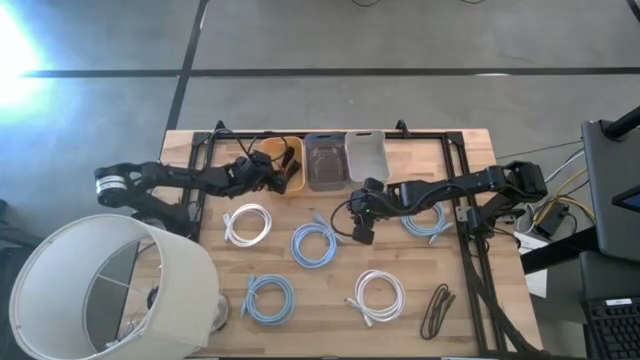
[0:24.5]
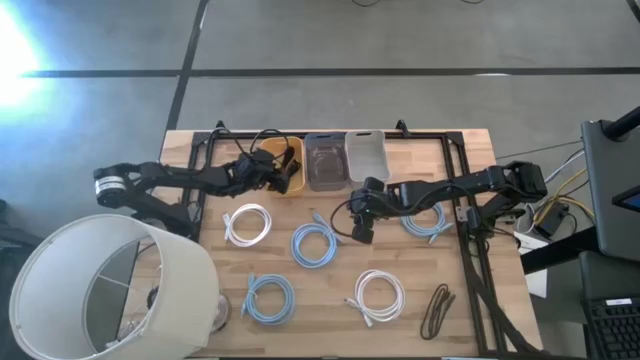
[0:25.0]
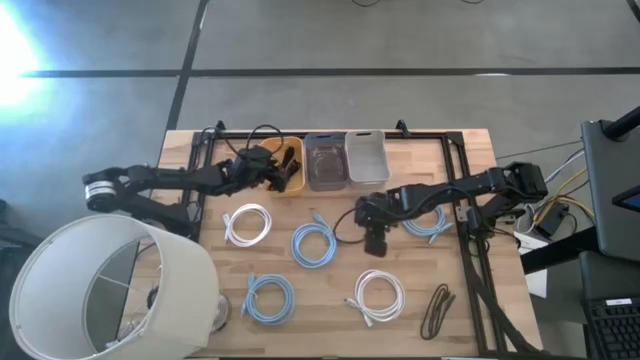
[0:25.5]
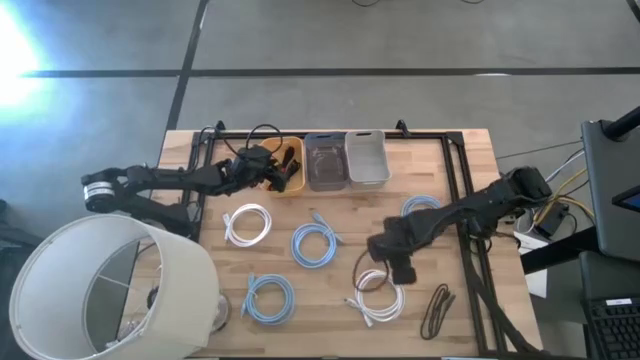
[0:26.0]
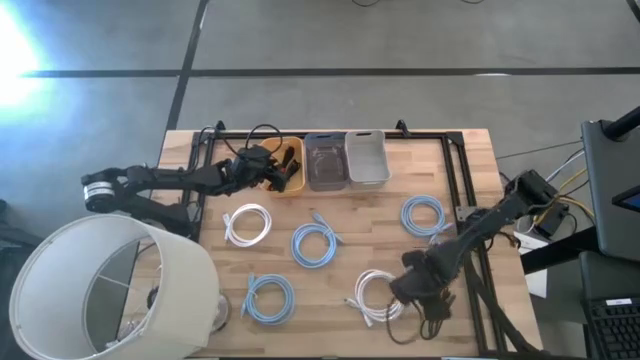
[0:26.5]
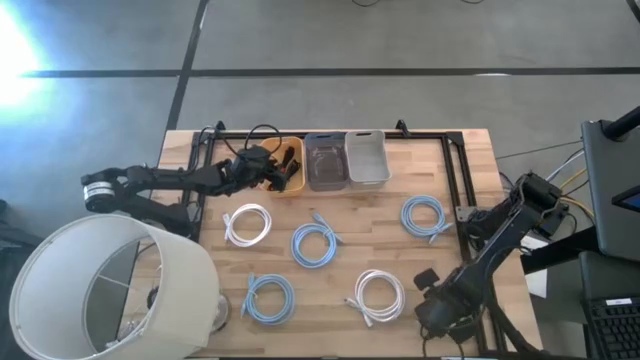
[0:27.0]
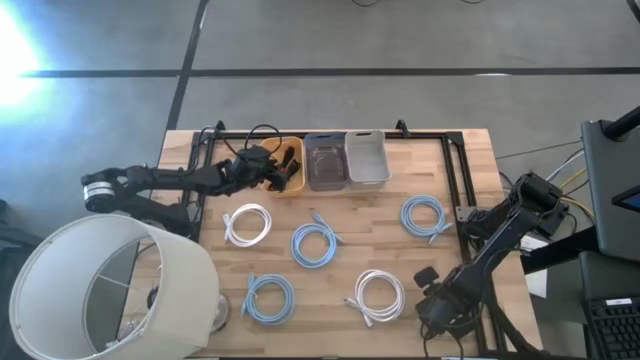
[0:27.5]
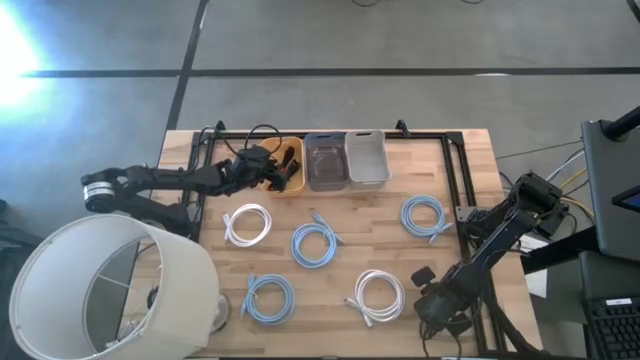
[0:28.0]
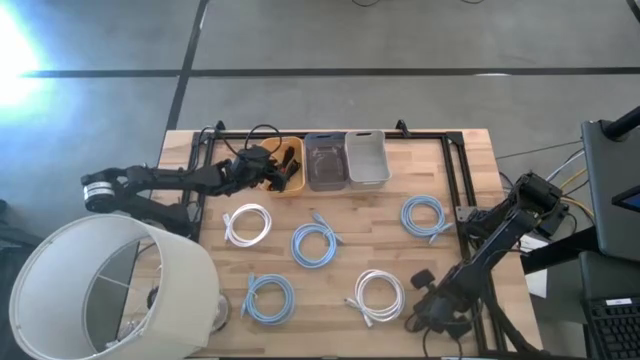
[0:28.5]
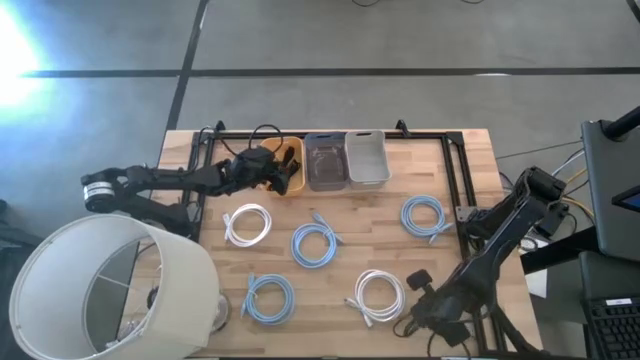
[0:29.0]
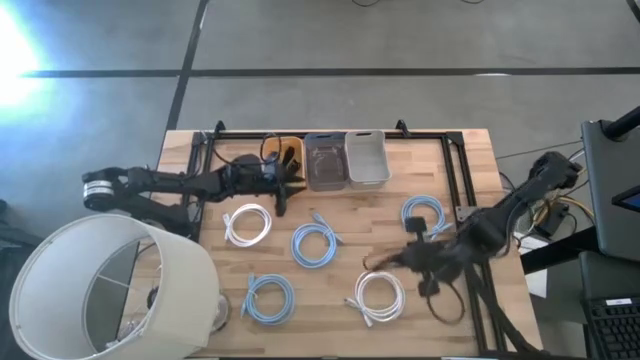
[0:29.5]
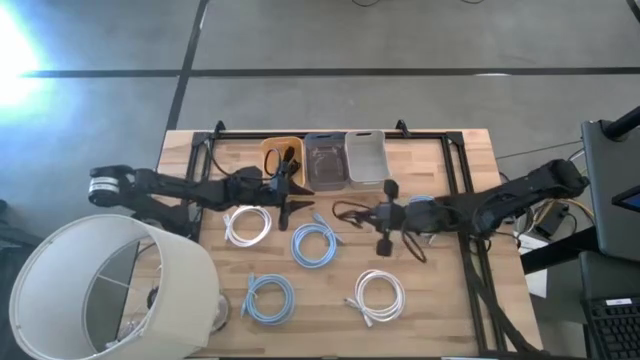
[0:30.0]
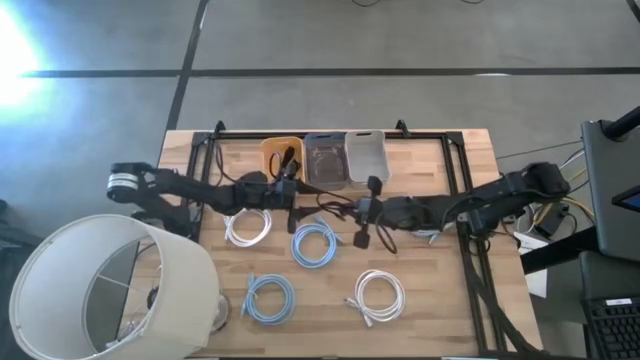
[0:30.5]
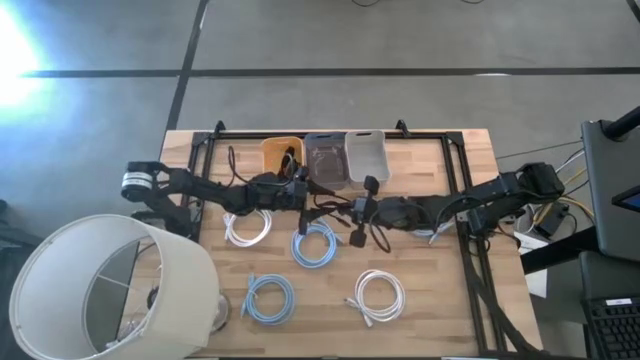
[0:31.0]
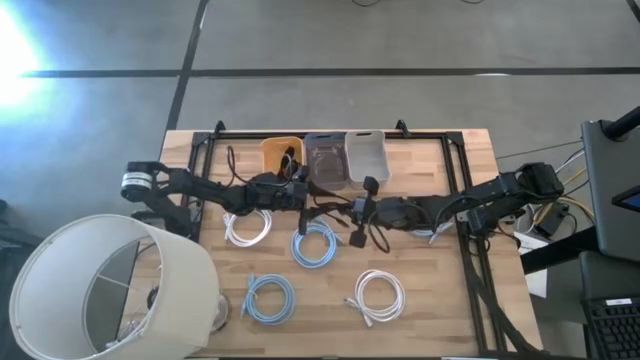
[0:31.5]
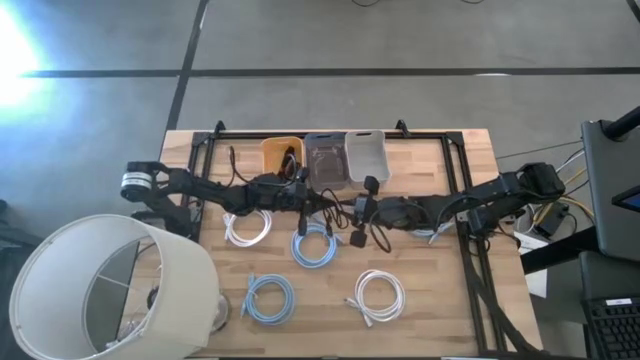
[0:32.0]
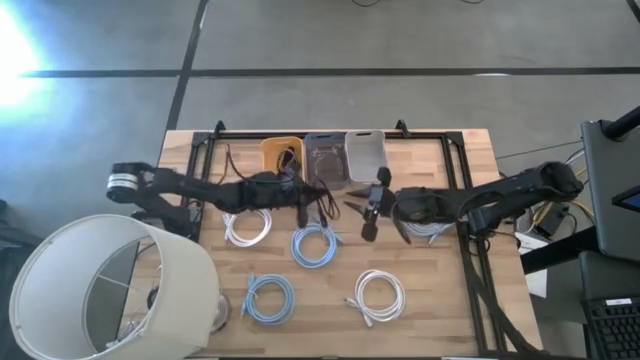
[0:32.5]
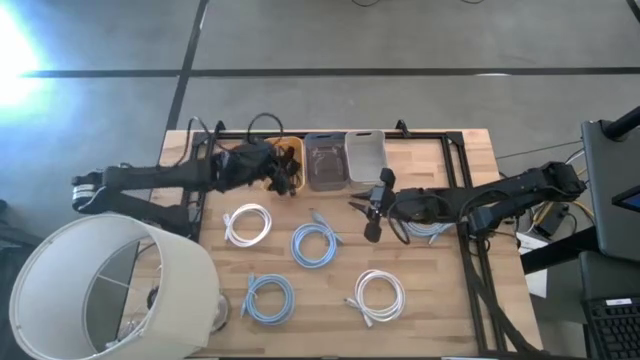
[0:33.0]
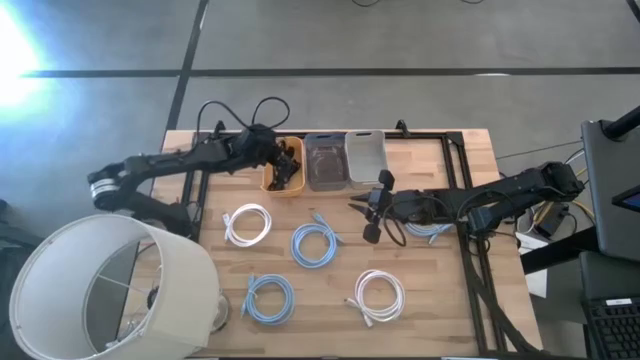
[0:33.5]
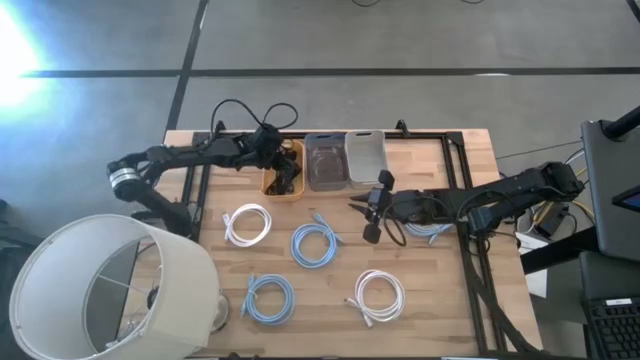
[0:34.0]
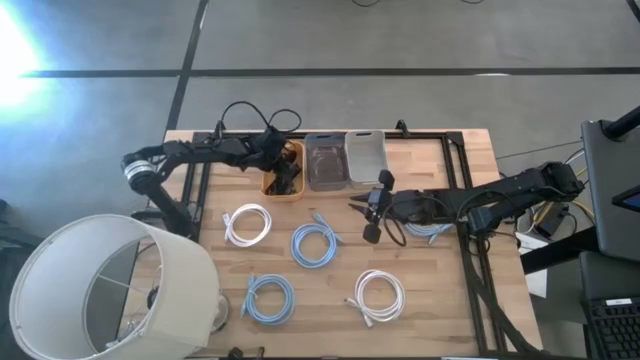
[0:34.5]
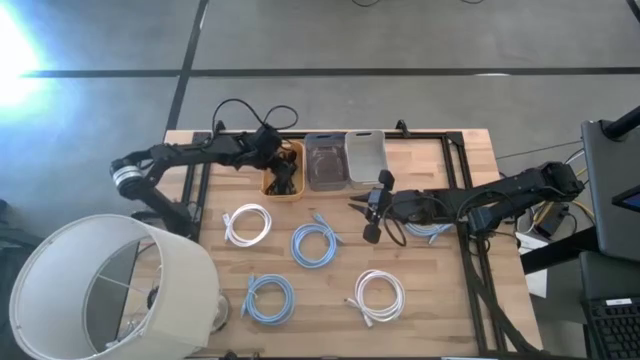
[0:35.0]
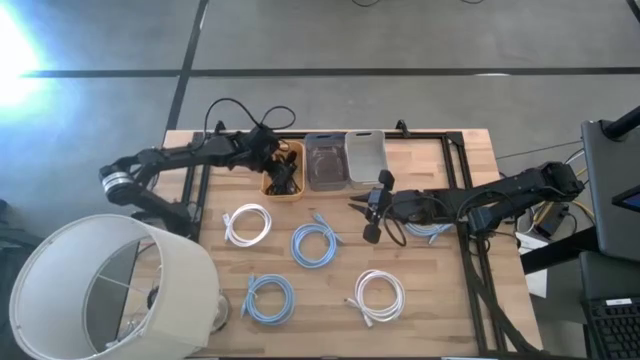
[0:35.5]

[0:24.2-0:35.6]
Task: Pick & Place USB Port
Put the black usb cable into the yellow bin

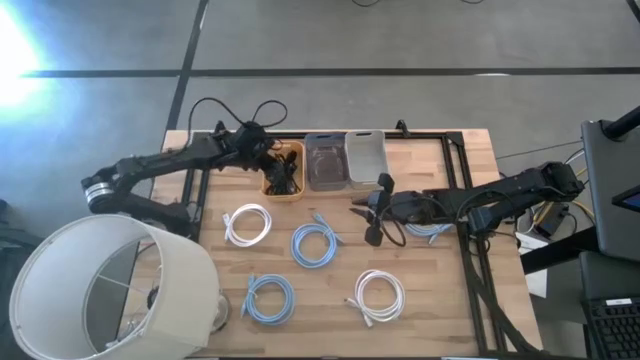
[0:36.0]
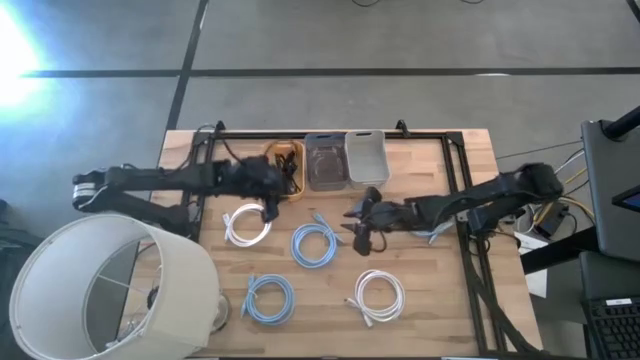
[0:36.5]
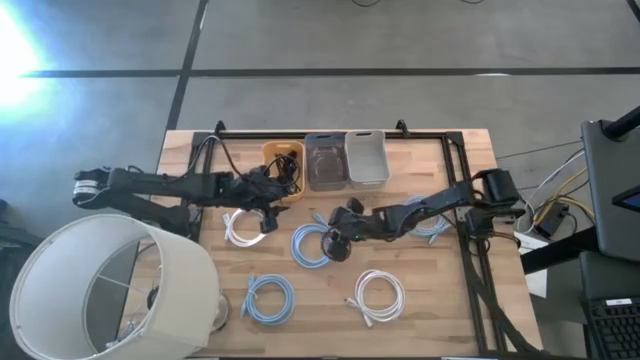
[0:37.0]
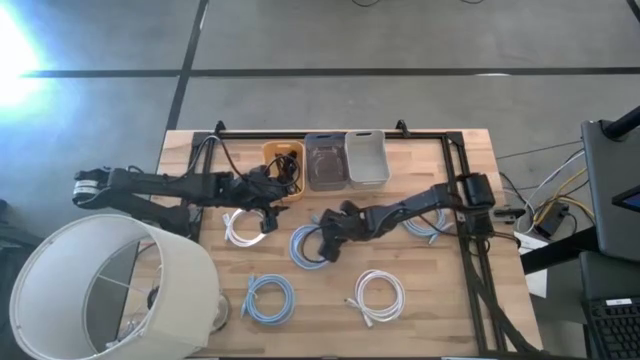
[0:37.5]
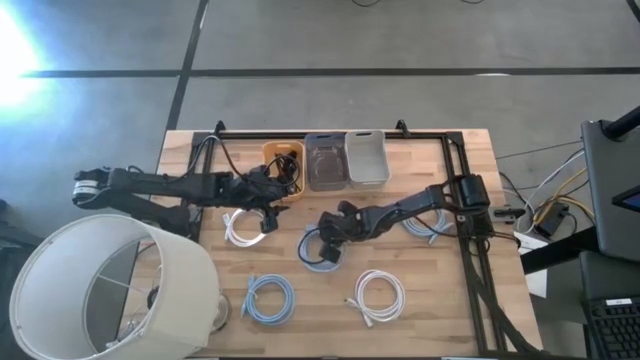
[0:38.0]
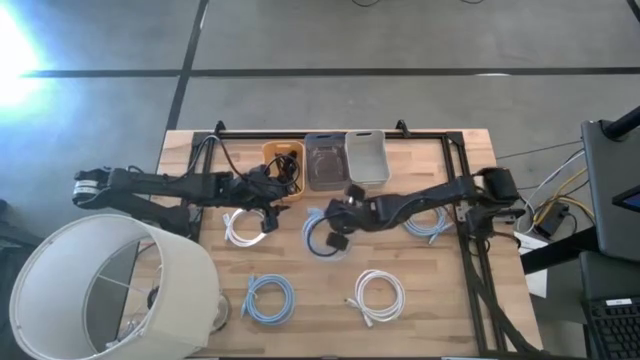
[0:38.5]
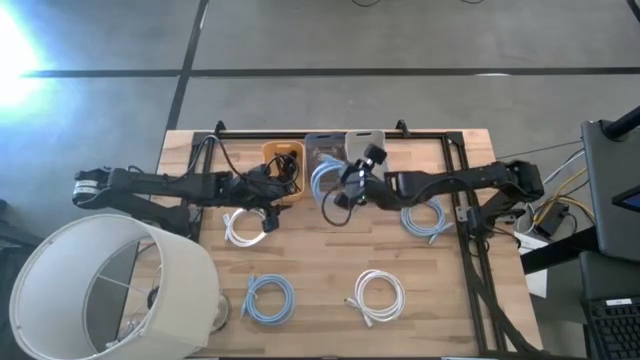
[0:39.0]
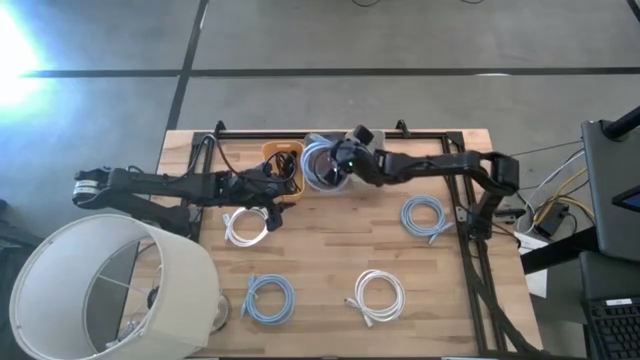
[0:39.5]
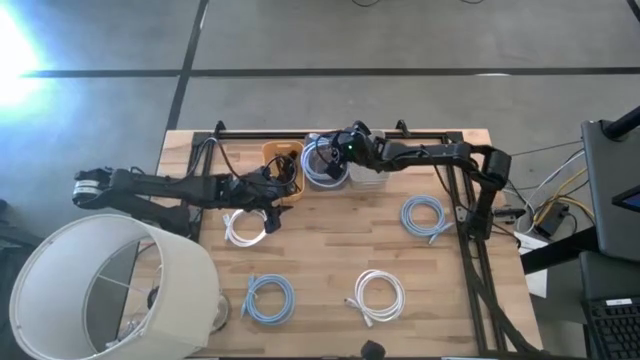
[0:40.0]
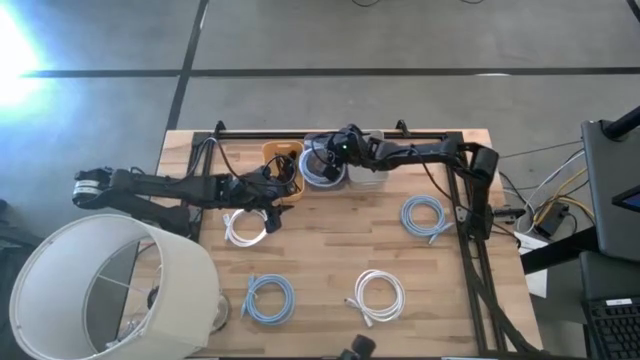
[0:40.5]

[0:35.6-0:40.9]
Put the top left blue hdmi cable into the black bin

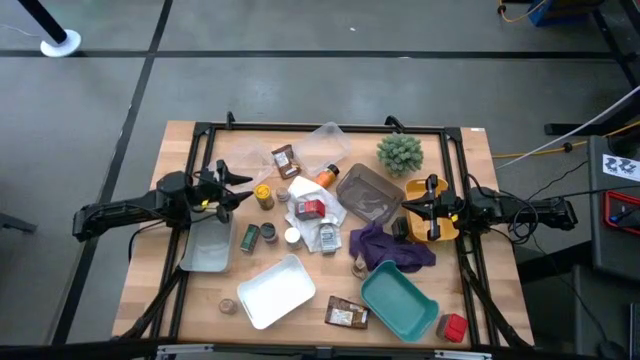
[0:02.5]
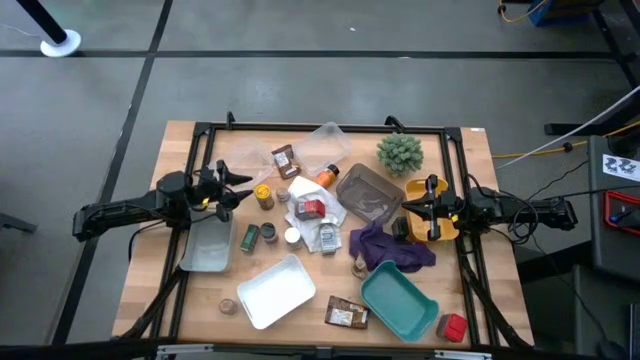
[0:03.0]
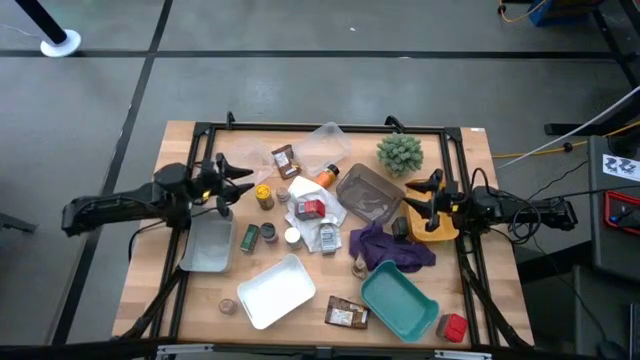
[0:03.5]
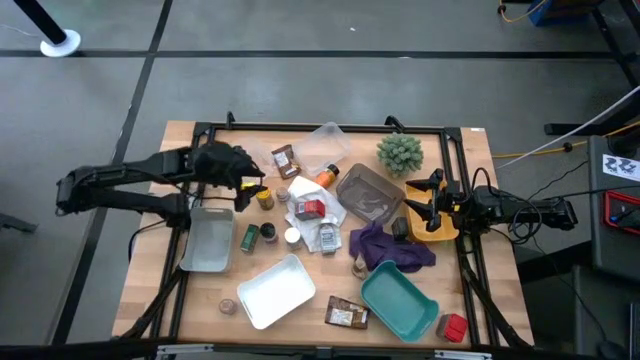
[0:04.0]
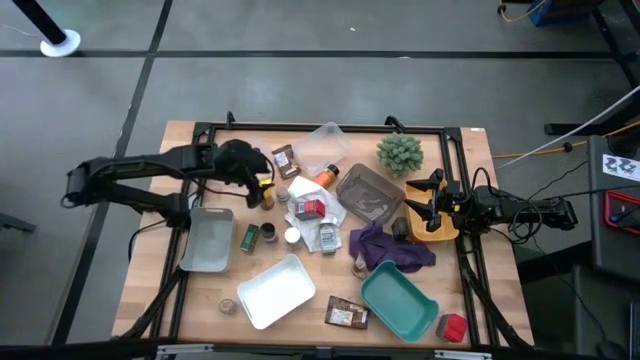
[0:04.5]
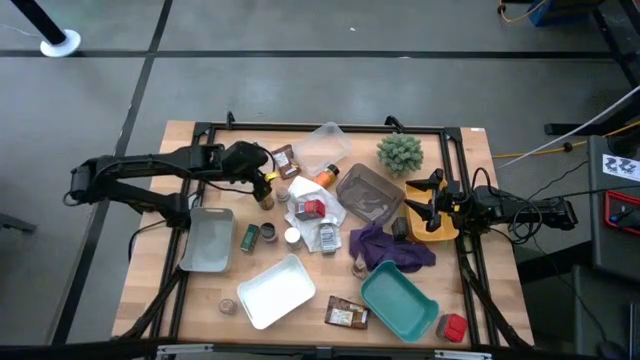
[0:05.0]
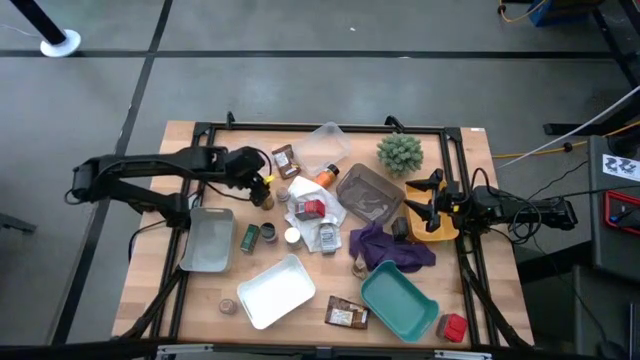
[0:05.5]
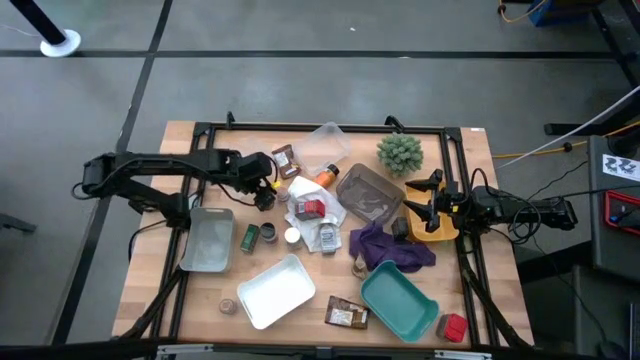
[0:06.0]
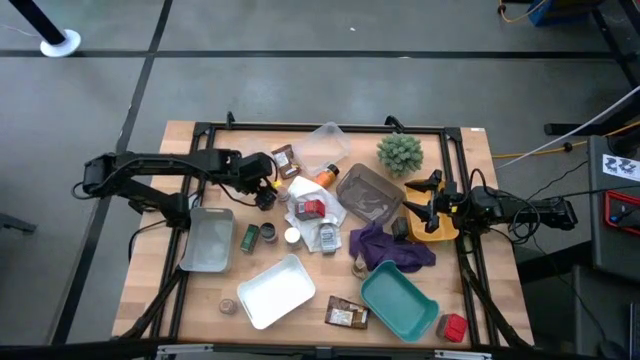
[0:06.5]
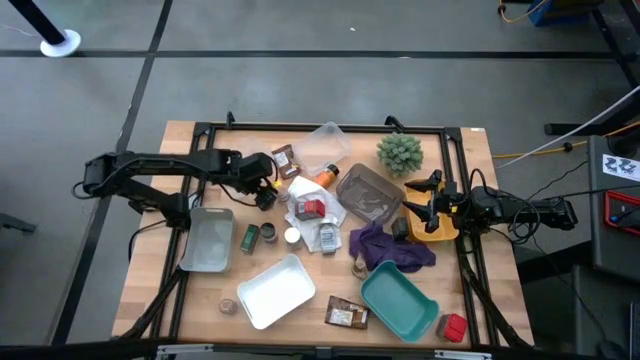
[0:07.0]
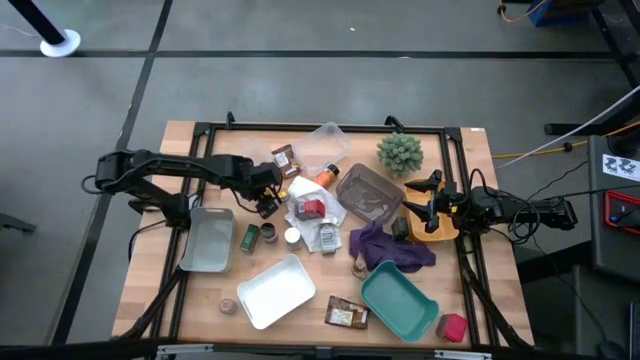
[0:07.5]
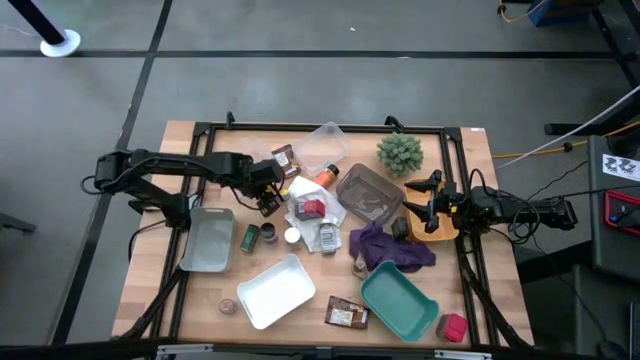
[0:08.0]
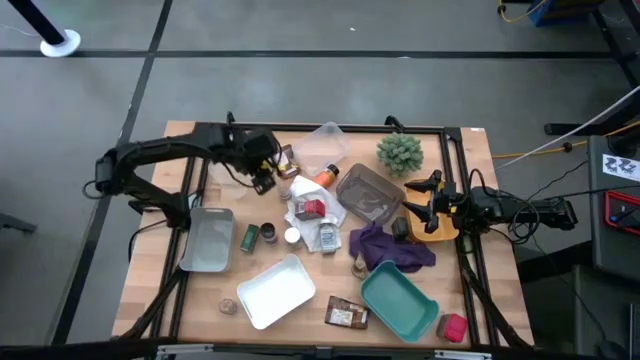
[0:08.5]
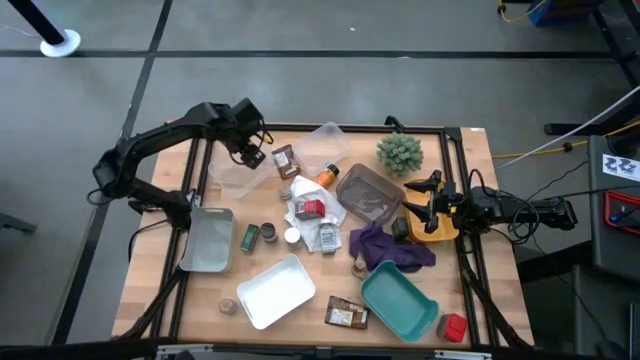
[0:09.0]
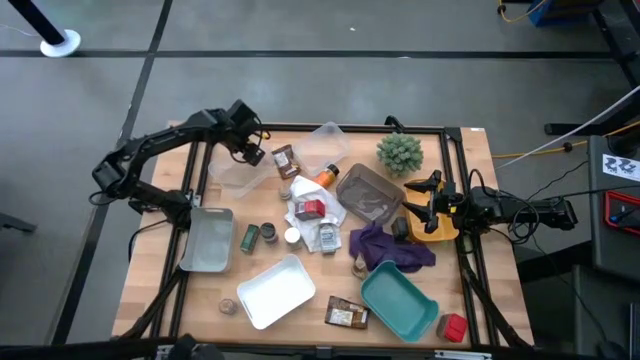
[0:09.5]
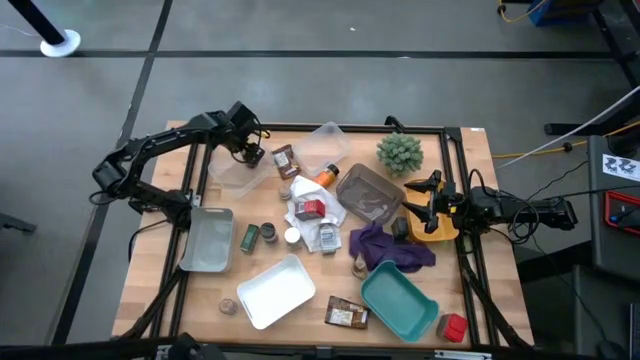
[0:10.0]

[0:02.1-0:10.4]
Task: Sort spices by type
Put the yellow spice bottle into the left transparent bin
